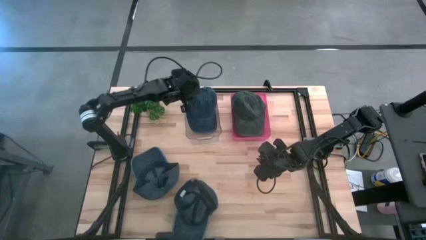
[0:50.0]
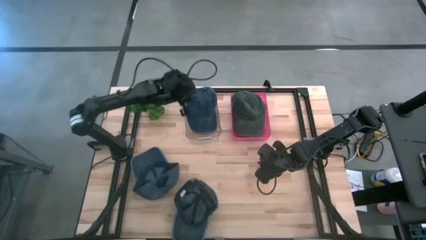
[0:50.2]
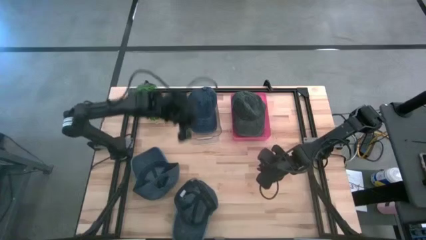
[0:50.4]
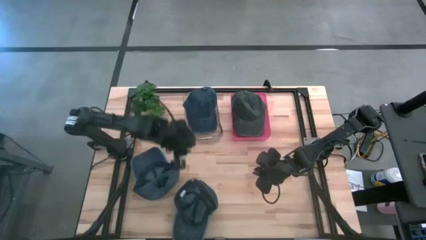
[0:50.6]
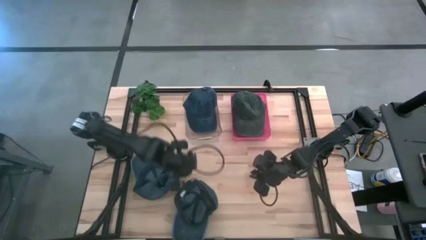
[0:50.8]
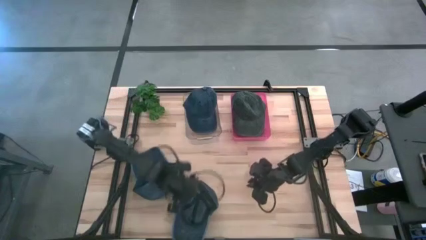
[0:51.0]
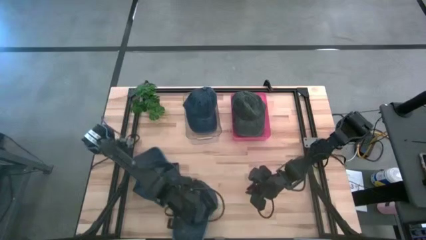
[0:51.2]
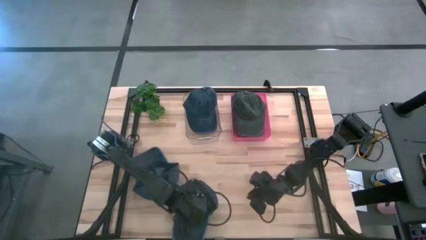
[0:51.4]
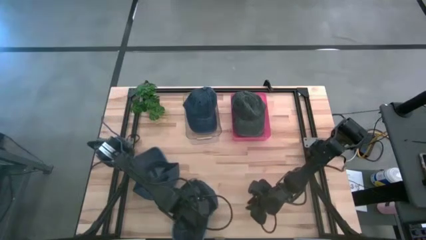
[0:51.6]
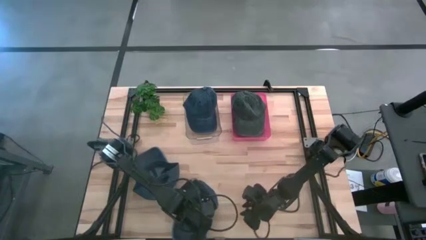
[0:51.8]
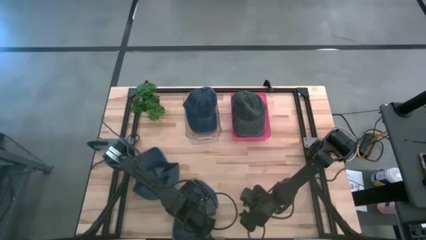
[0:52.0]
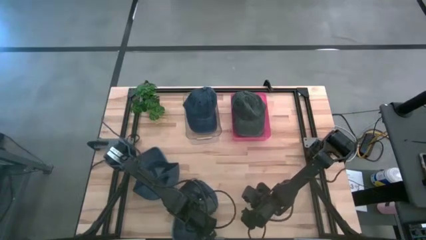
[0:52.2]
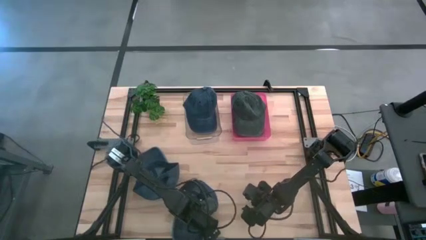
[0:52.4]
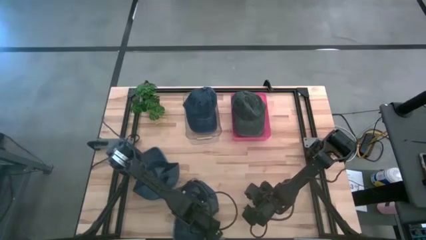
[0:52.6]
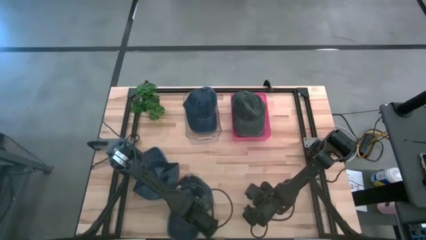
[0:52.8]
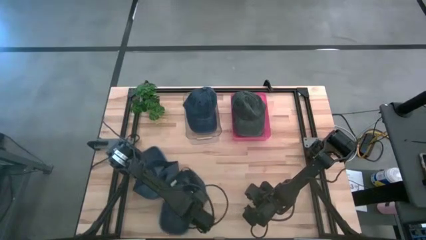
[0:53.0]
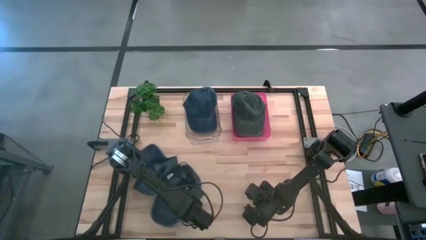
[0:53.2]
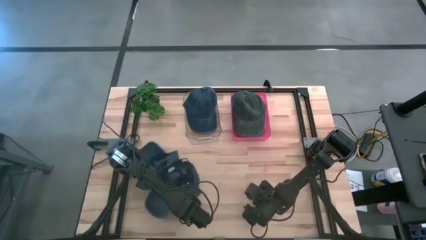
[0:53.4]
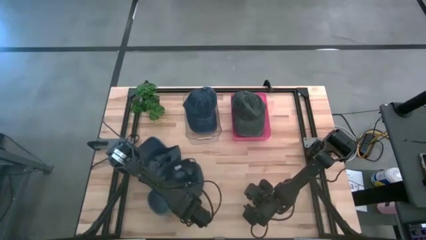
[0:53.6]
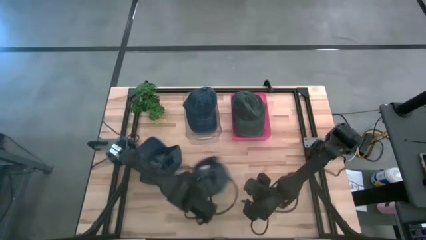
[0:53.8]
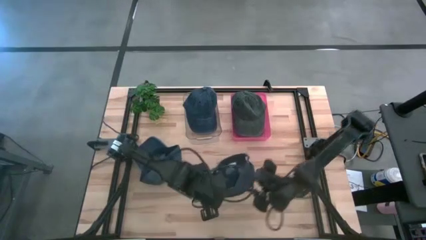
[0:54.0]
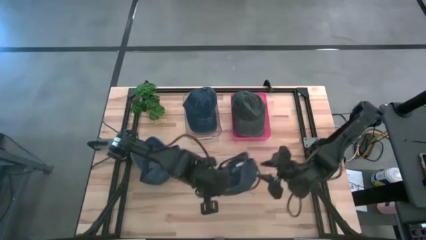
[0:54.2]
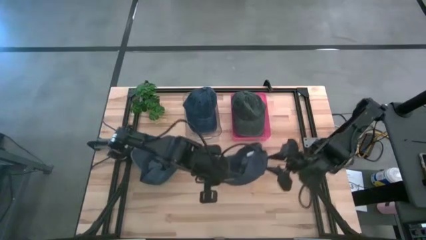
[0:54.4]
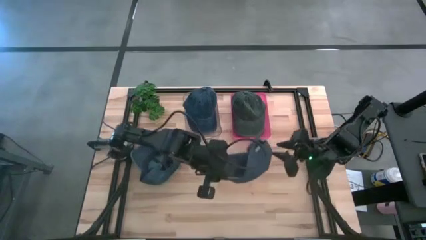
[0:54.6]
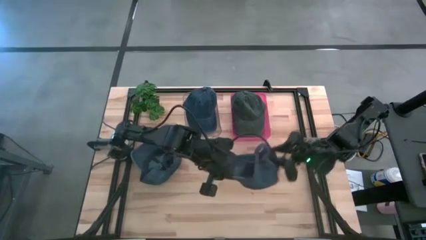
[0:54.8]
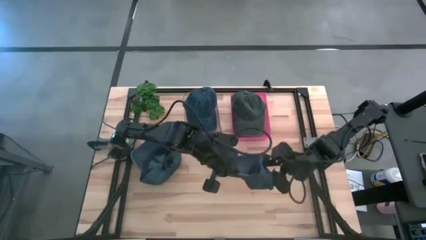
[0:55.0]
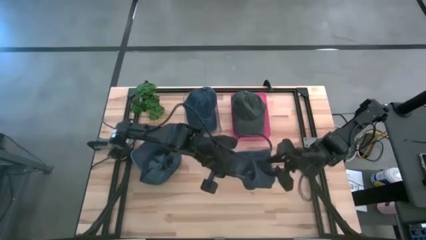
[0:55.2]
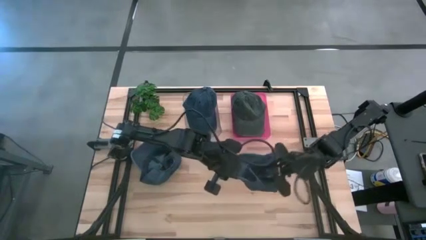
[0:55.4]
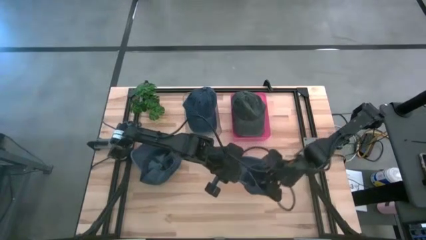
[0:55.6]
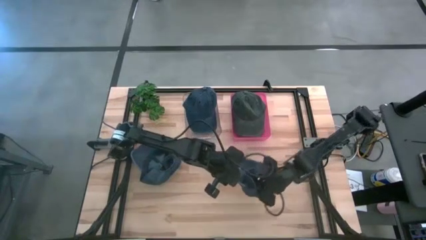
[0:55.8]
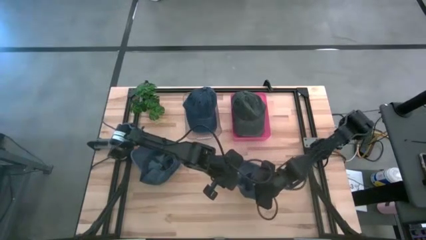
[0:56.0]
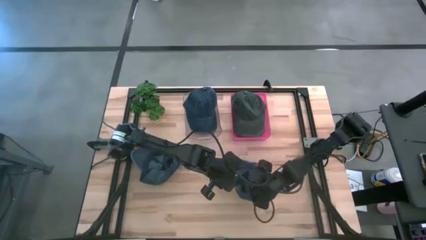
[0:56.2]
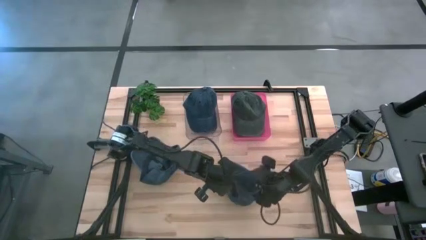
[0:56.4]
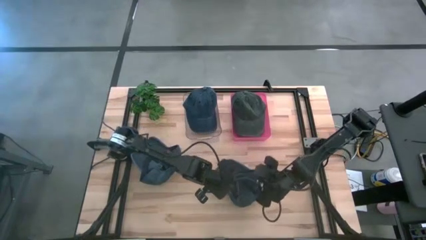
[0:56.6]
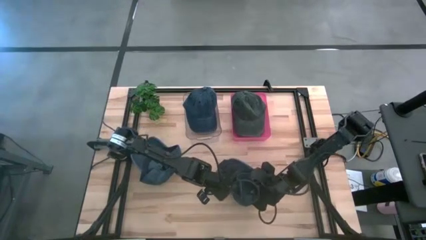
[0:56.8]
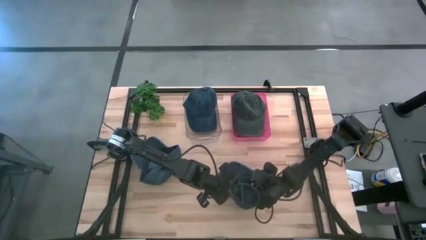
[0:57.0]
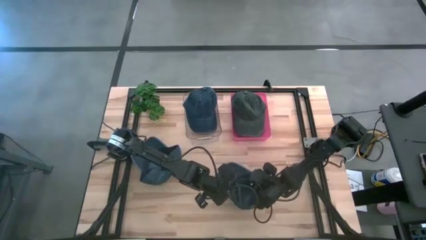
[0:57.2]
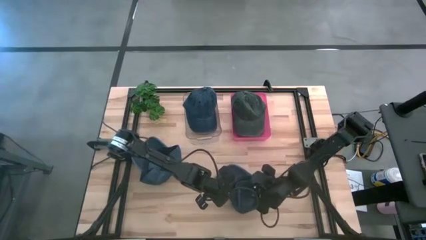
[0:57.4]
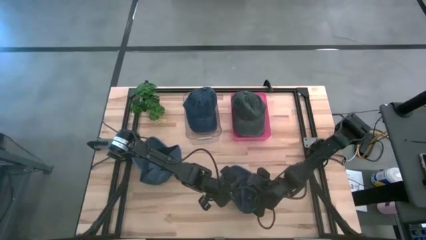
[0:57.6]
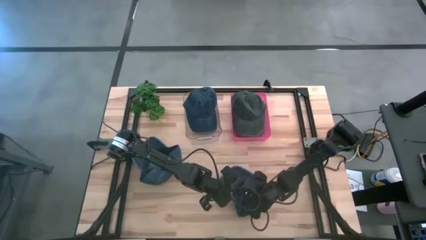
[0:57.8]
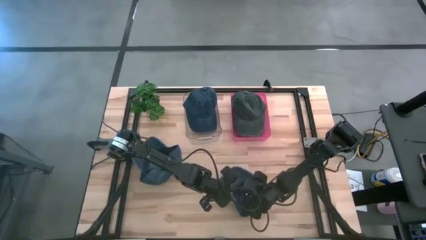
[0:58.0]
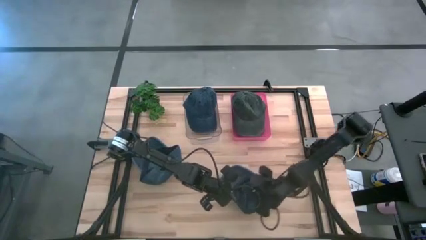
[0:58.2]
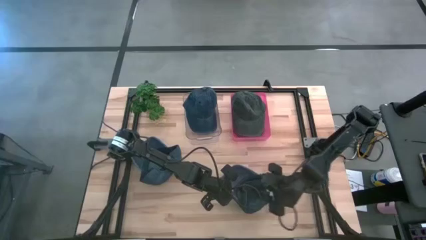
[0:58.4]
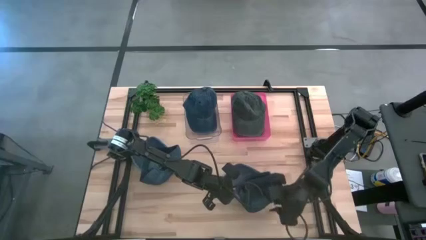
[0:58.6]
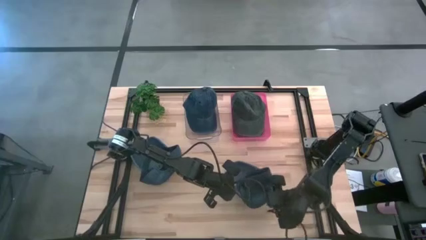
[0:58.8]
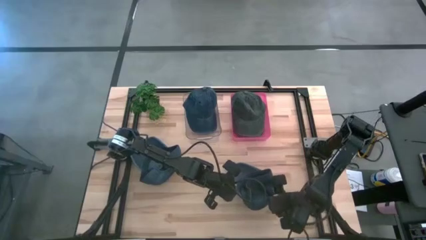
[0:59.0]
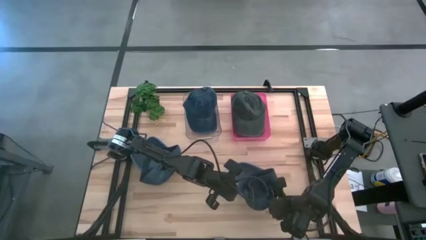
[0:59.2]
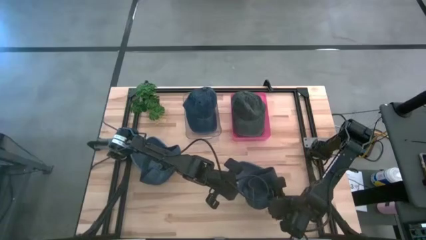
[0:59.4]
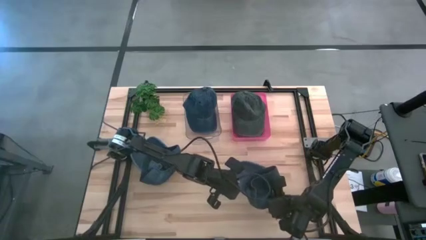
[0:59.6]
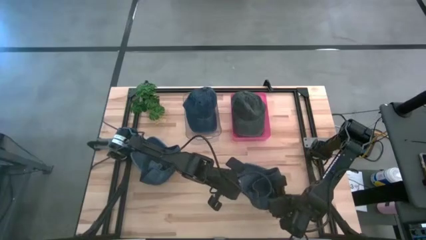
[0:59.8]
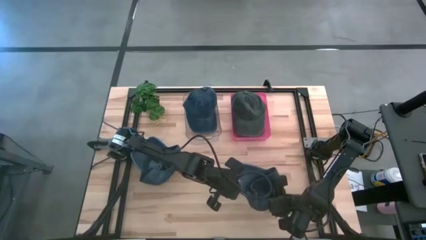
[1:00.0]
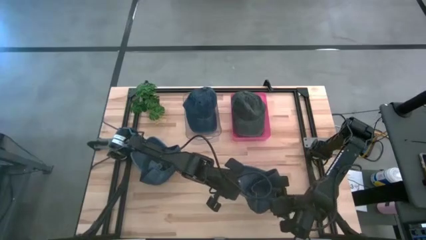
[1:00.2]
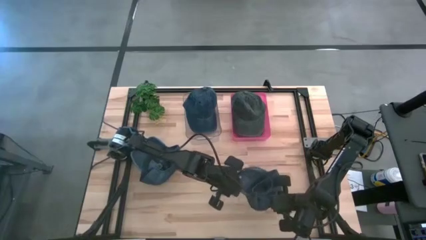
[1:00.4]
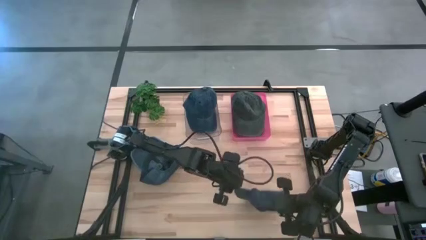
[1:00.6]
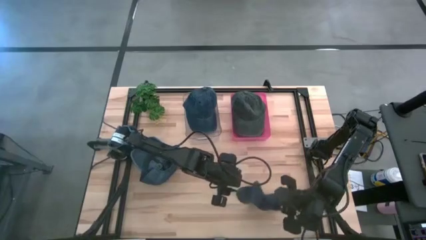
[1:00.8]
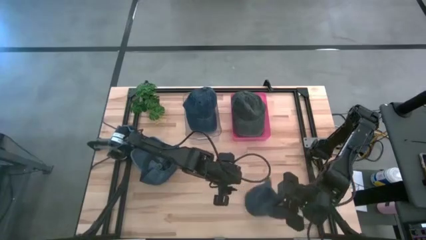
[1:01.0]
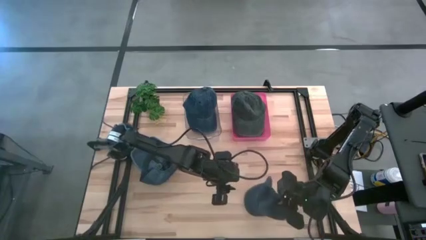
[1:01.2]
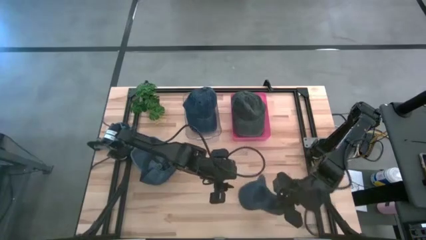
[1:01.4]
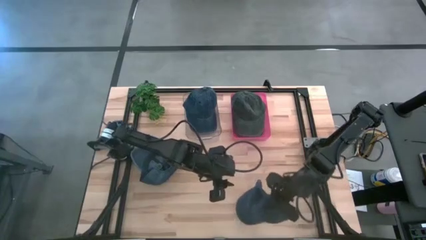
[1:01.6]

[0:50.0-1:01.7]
Task: Pick & Place hat
Put the bottom blue cap into the transparent bin

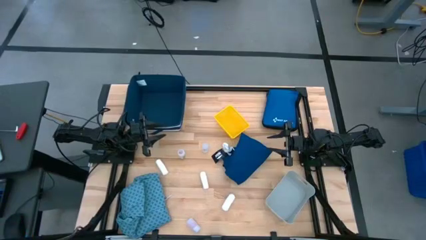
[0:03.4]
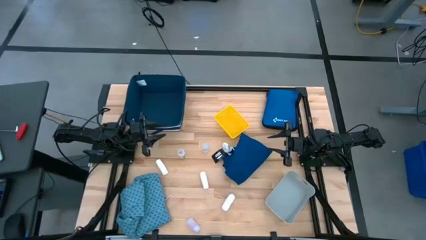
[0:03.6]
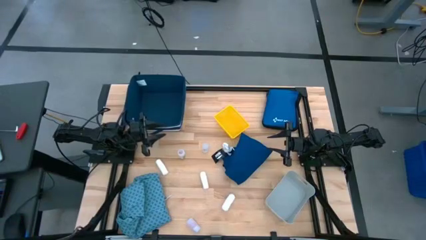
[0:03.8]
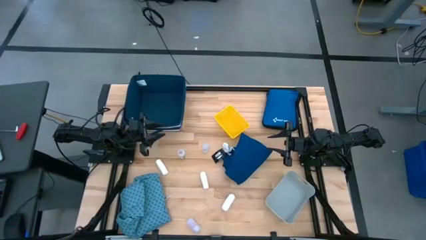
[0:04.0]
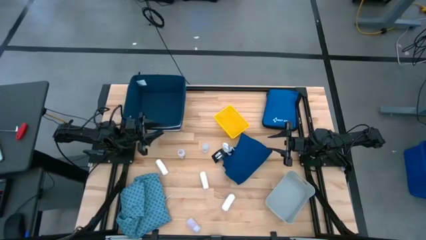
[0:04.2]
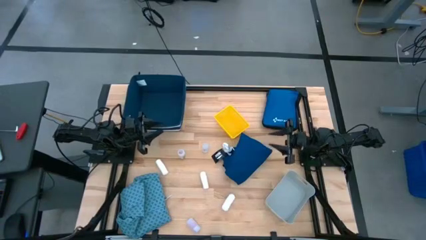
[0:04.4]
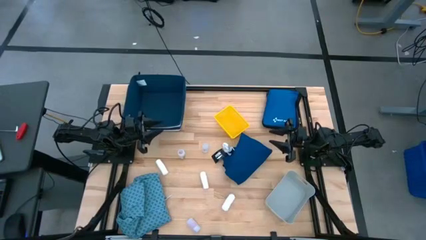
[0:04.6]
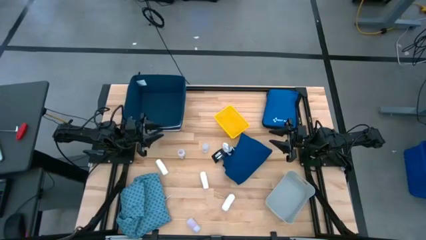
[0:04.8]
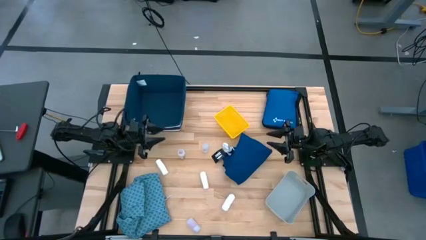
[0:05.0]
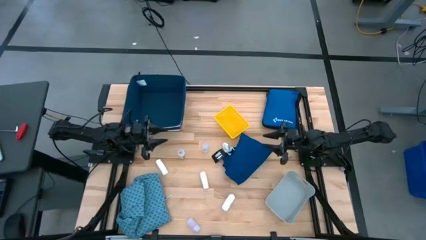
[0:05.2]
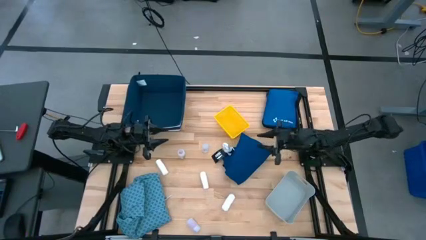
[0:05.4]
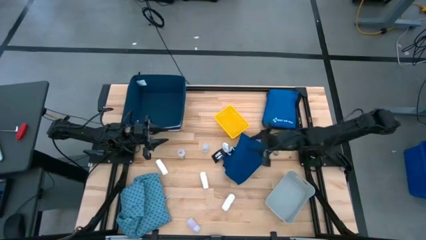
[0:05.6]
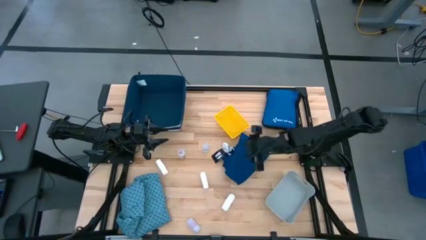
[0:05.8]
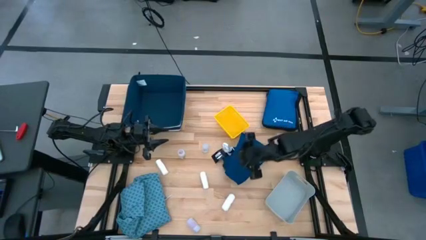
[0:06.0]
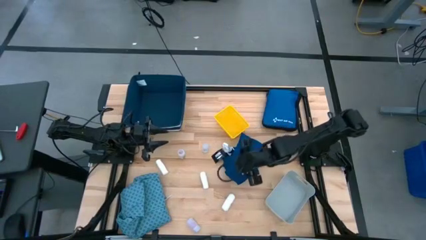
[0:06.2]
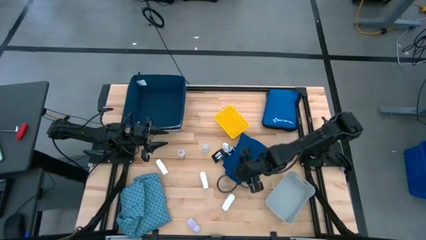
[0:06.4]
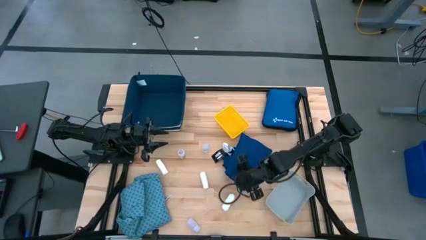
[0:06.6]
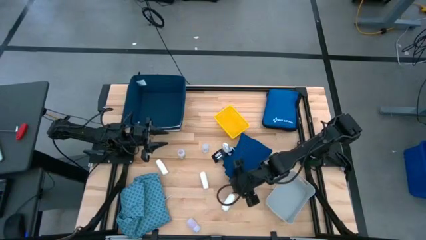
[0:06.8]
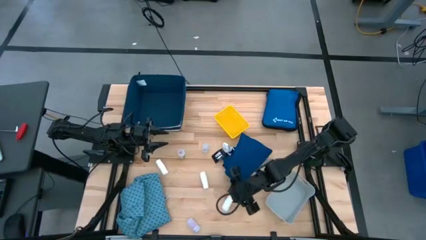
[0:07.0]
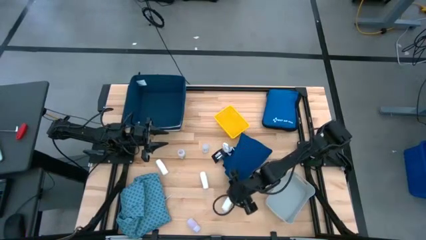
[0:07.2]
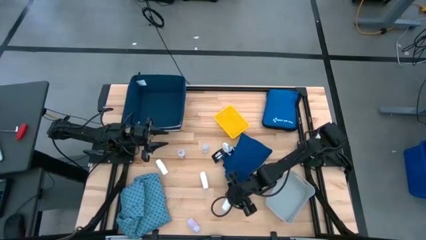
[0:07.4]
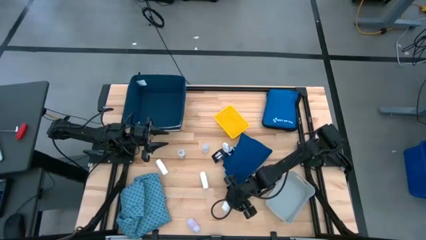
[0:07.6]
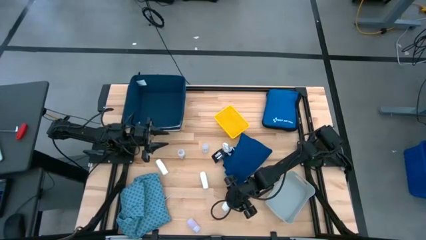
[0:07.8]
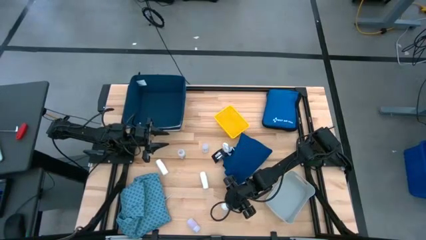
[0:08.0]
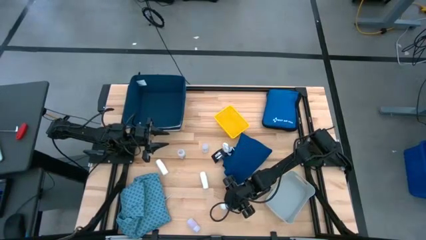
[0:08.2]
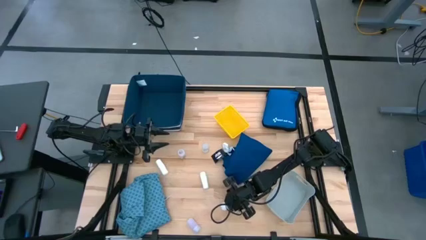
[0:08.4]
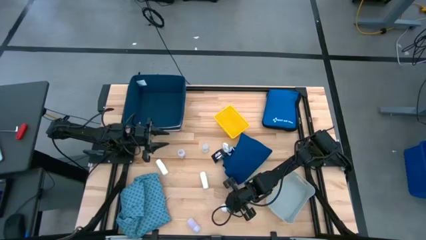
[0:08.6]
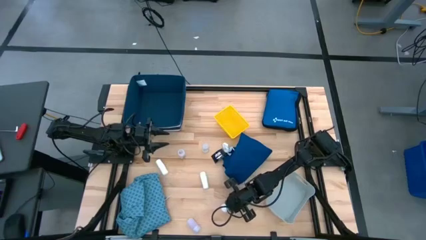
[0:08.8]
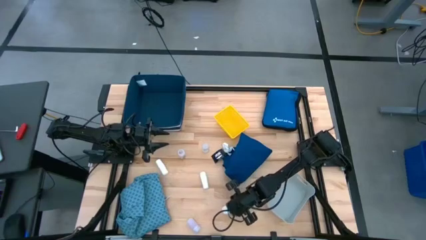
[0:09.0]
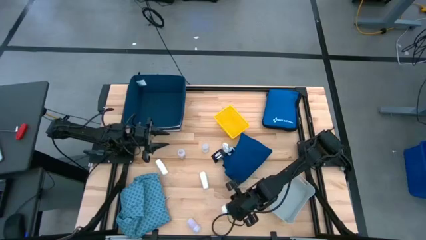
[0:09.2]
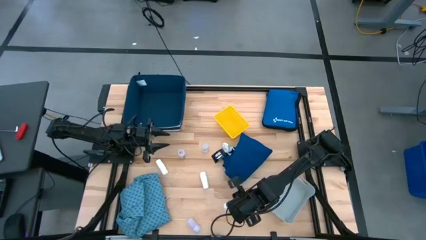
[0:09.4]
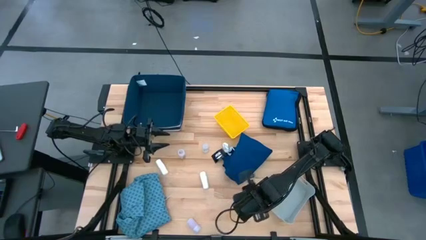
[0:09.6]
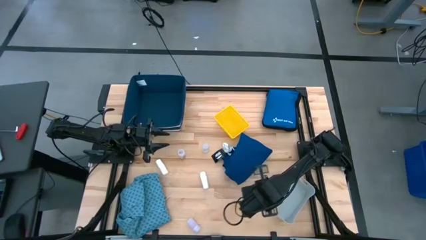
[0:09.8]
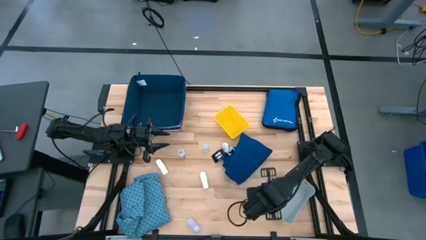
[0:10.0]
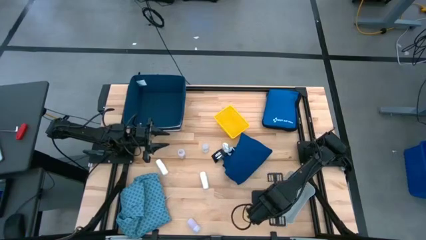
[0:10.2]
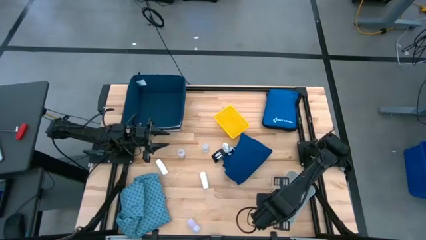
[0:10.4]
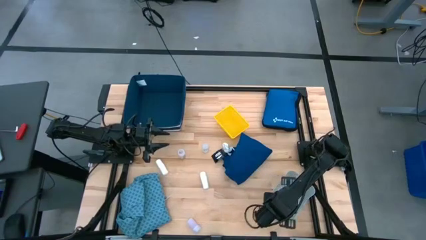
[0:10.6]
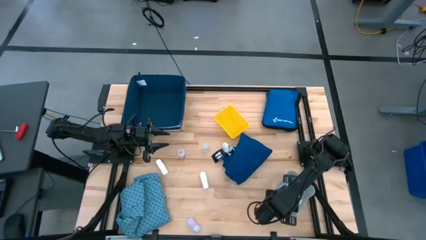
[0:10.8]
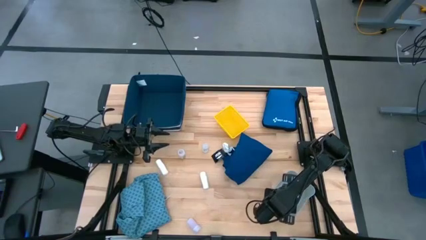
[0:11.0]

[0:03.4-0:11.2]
Task: Pick & place medical supplies in basket/bin
Put the right white rolled gauze into the gray bin
